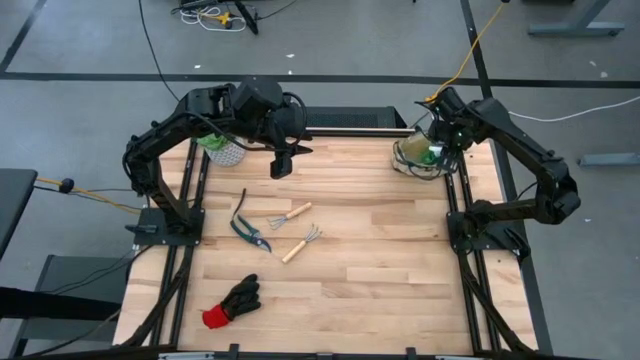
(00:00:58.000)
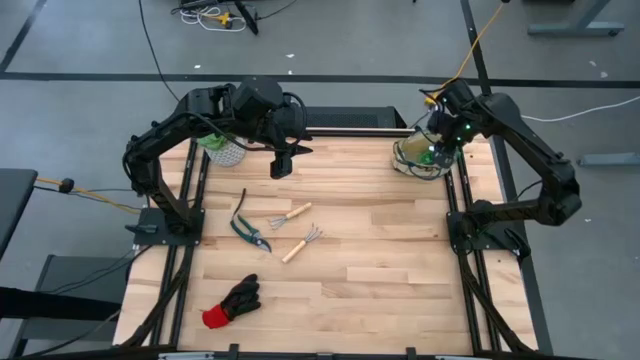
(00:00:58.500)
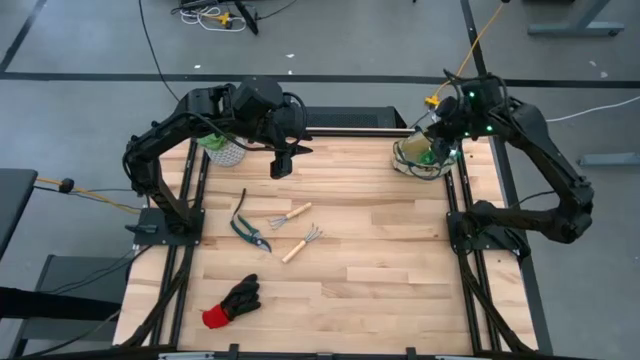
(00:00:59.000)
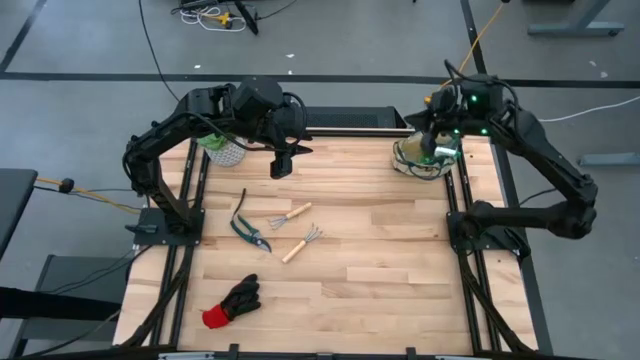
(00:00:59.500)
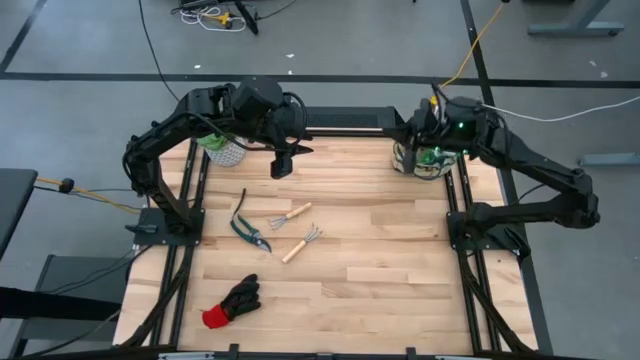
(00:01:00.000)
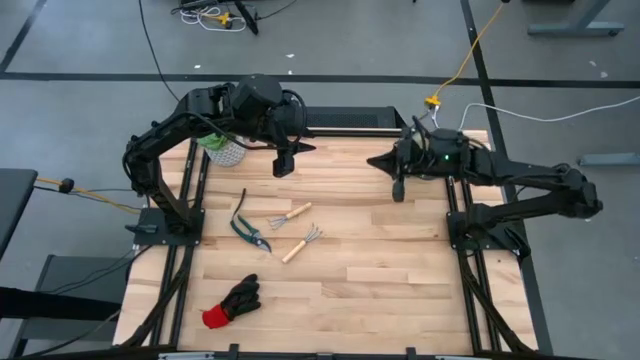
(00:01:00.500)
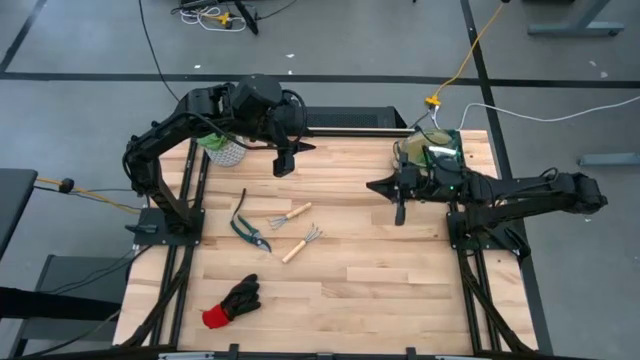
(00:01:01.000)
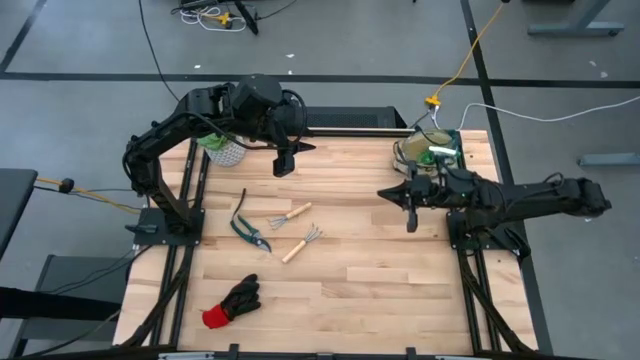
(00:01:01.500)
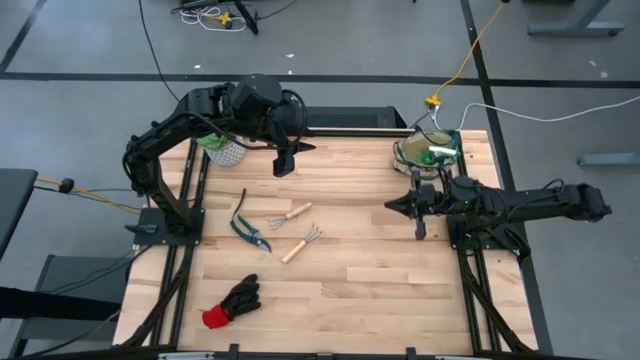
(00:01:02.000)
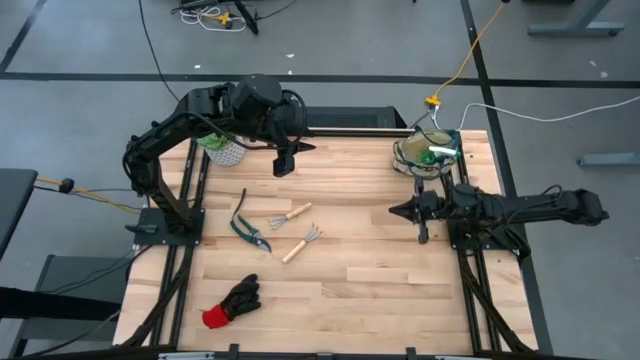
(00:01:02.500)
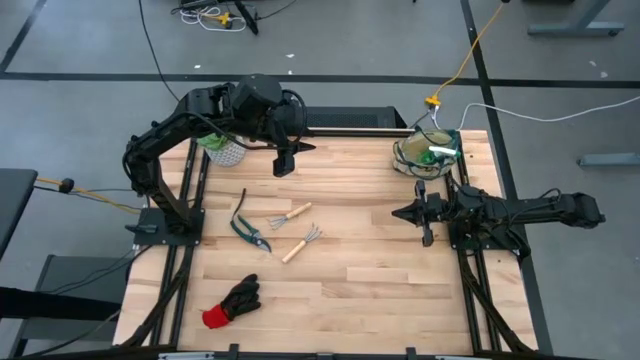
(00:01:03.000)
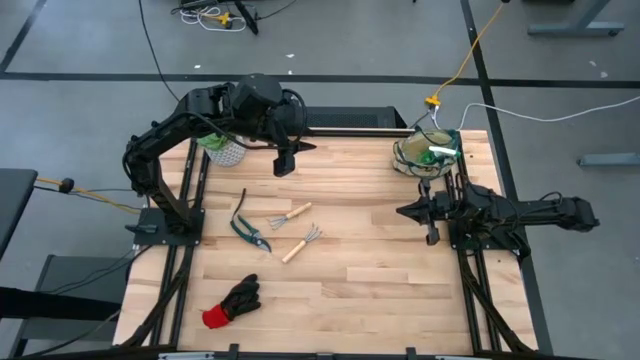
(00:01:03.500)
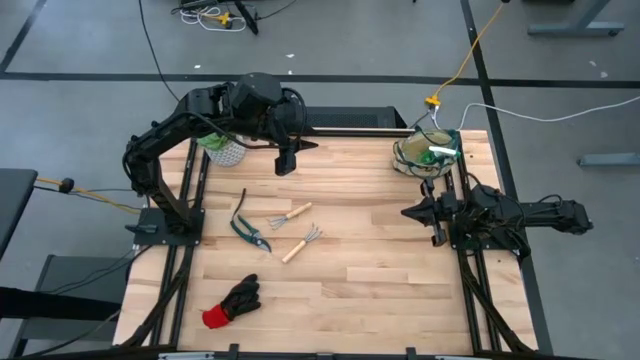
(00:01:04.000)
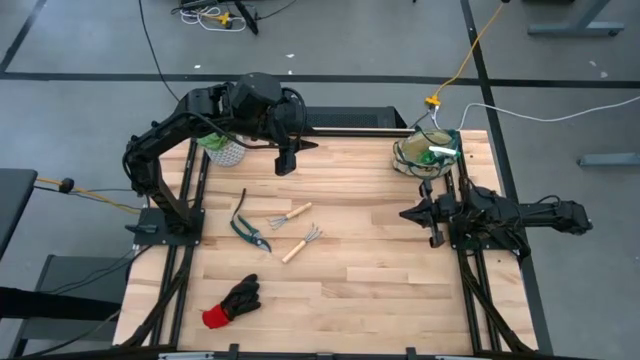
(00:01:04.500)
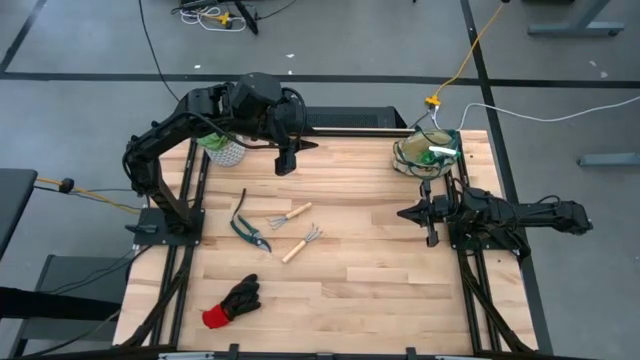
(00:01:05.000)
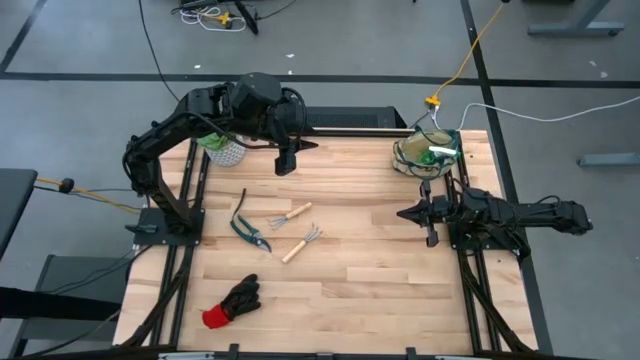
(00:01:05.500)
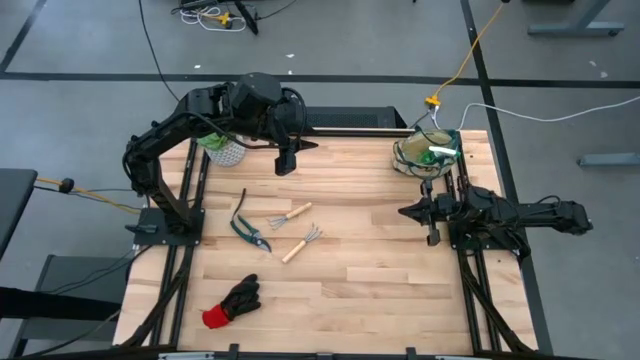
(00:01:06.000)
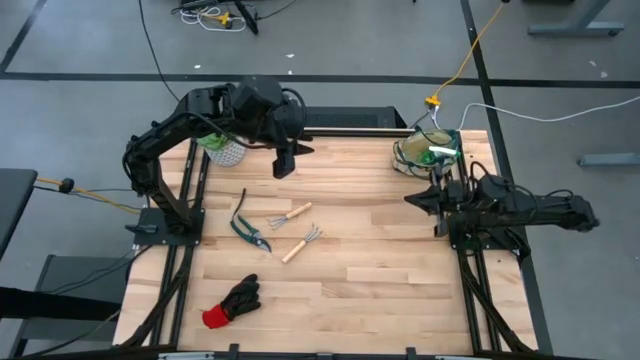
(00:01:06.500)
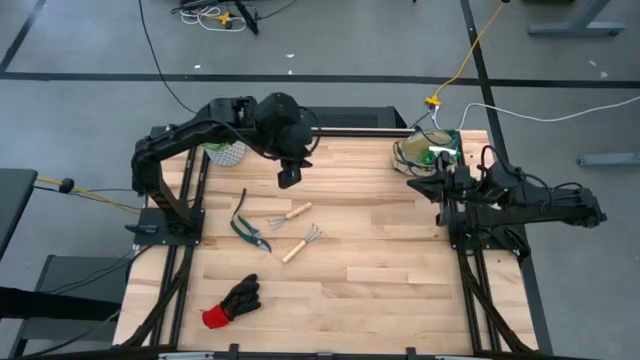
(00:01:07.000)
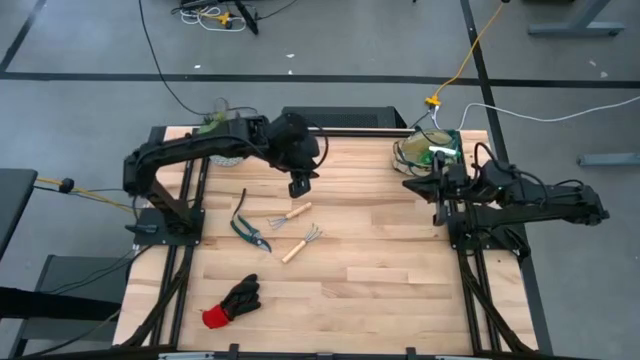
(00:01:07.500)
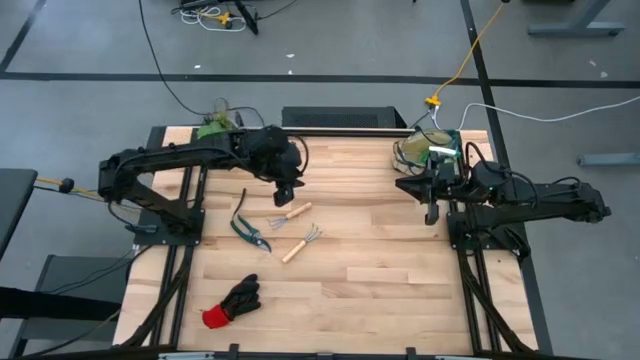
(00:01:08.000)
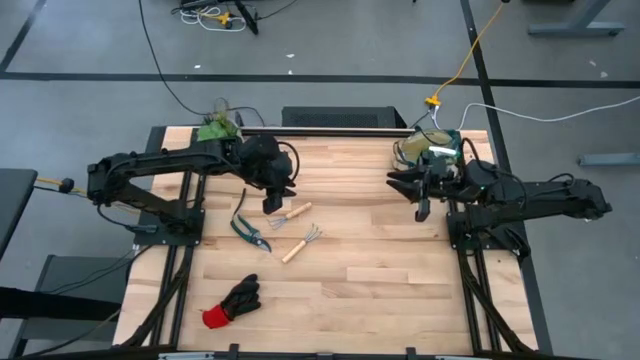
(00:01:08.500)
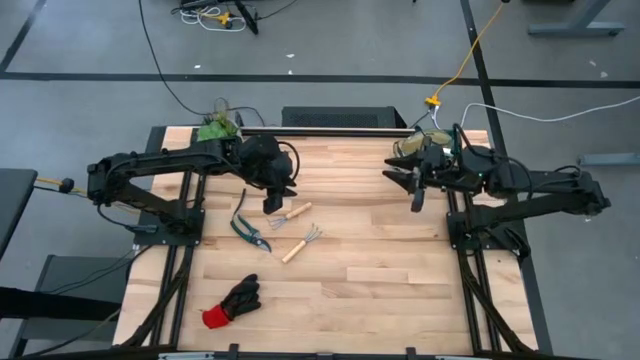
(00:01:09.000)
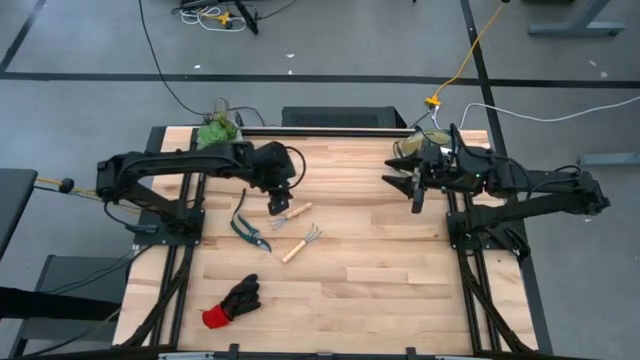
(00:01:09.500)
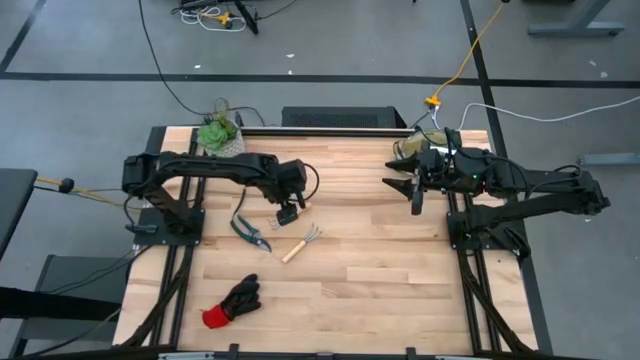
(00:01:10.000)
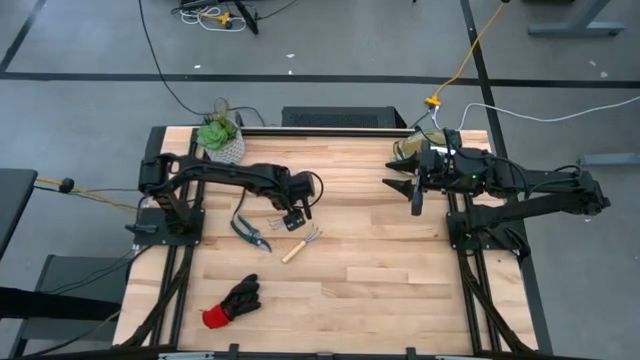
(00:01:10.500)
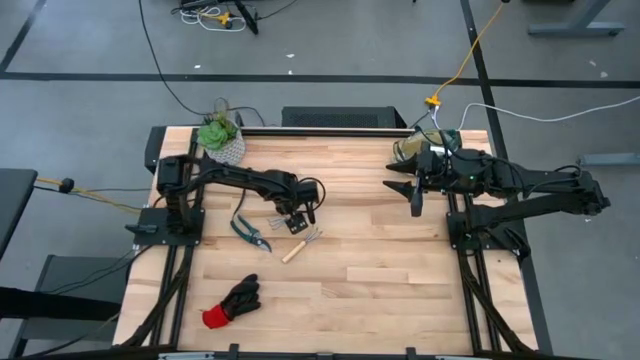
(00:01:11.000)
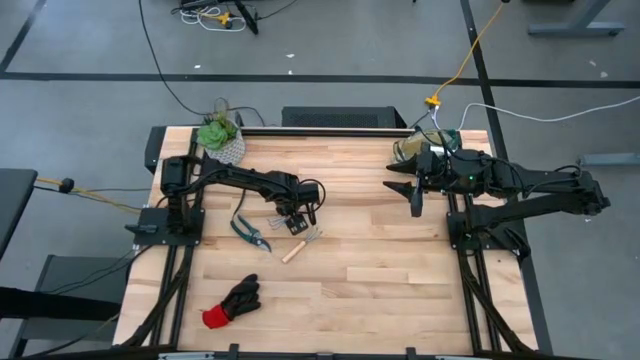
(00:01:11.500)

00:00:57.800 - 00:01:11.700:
Task: Pick & Place Garden tools in Gardening bag
Put the top brown hand rake into the brown gardening bag

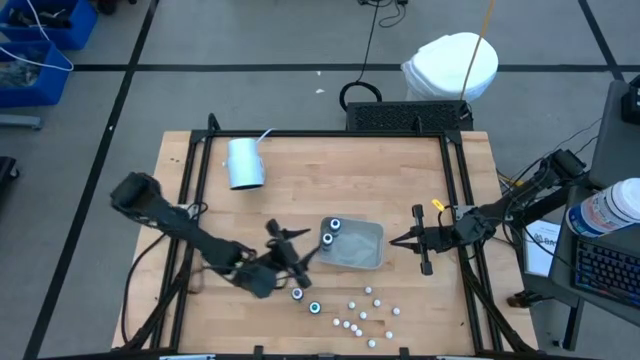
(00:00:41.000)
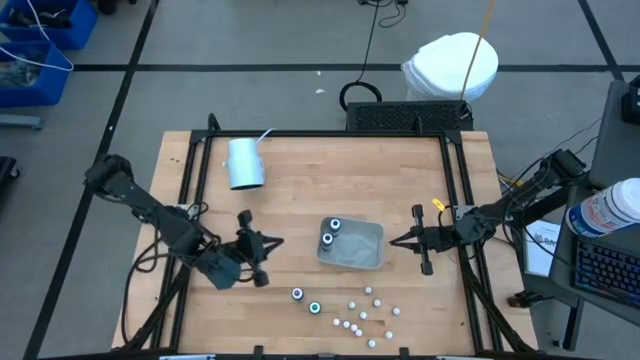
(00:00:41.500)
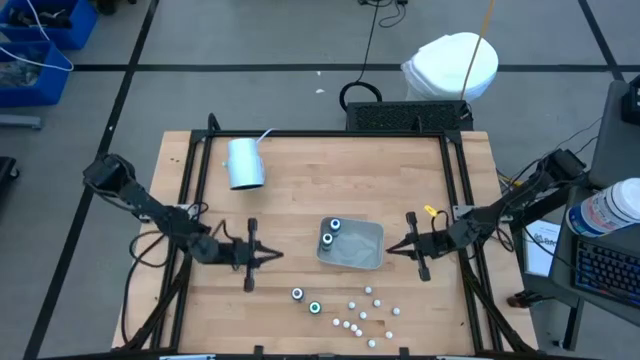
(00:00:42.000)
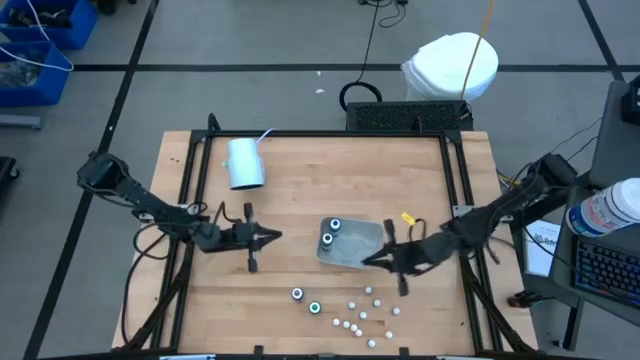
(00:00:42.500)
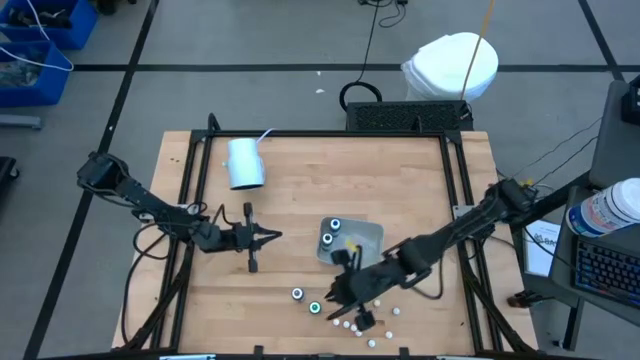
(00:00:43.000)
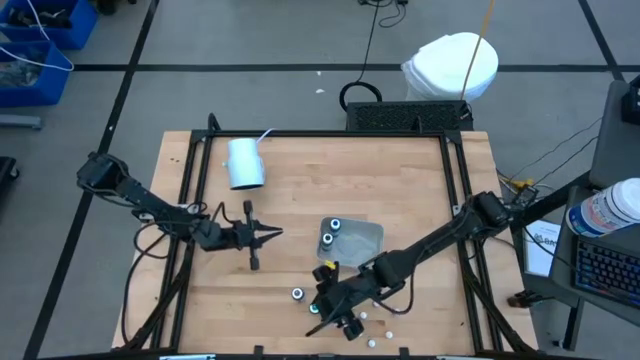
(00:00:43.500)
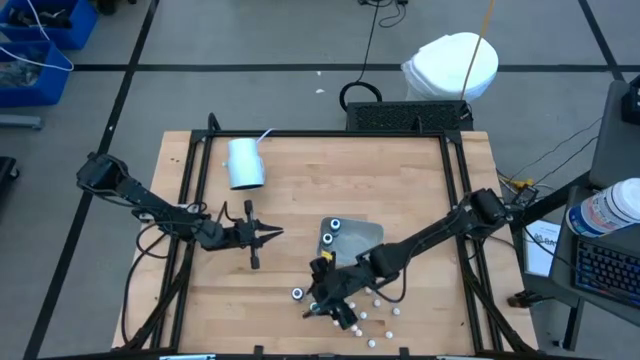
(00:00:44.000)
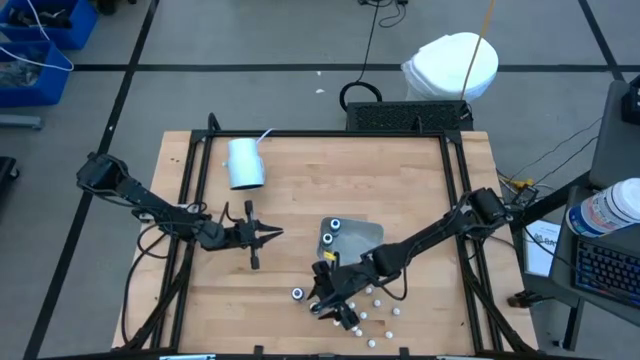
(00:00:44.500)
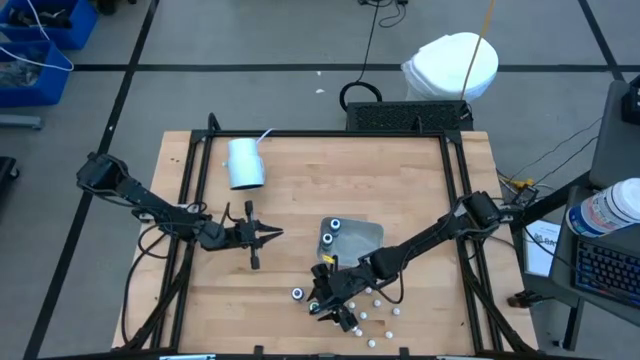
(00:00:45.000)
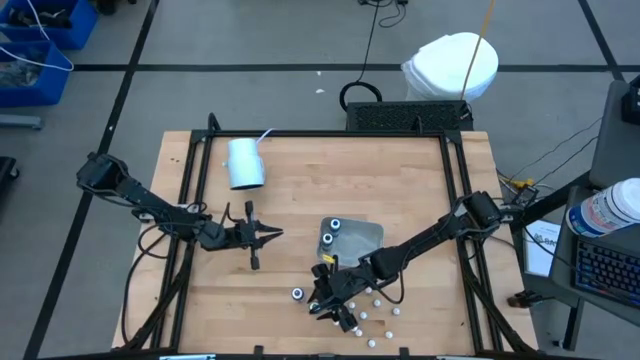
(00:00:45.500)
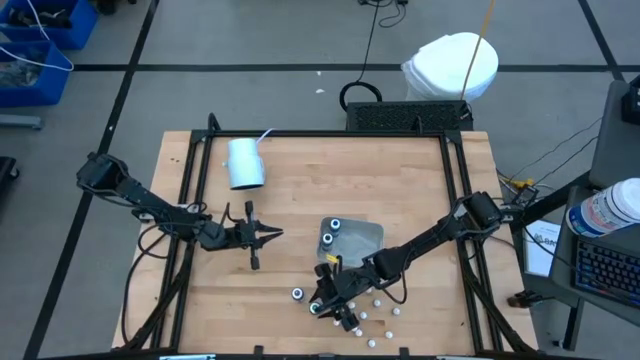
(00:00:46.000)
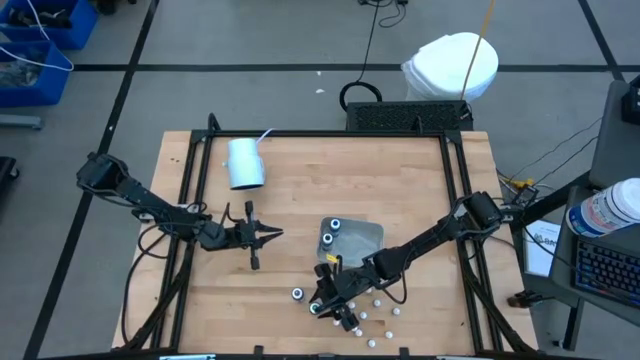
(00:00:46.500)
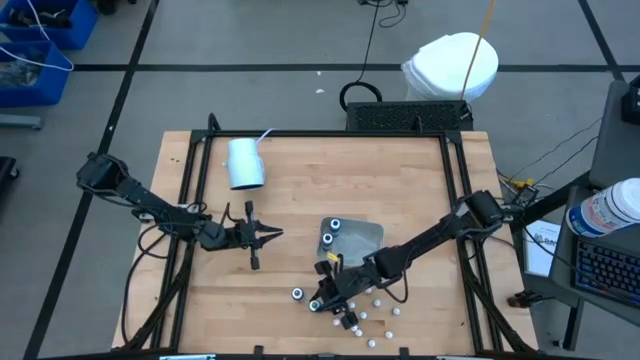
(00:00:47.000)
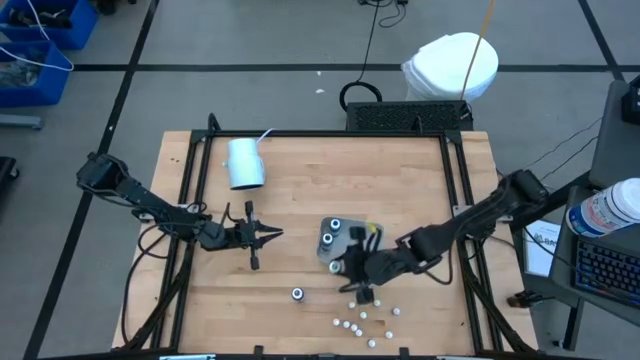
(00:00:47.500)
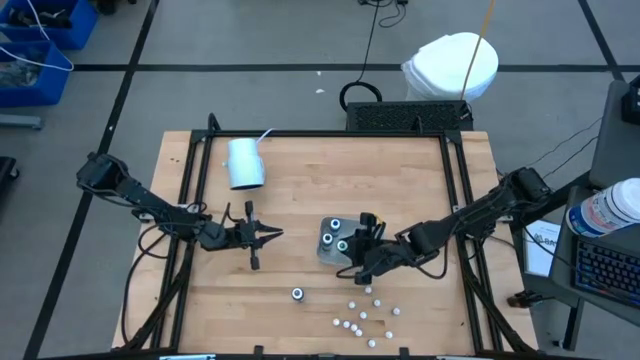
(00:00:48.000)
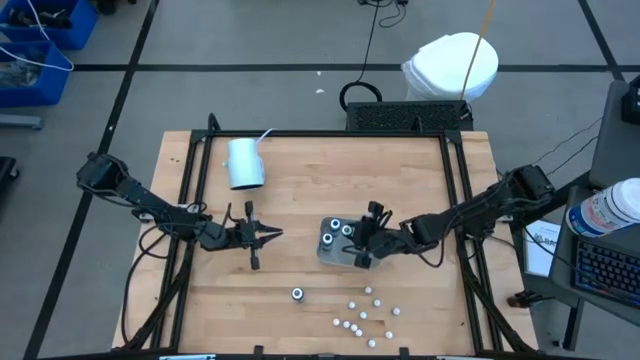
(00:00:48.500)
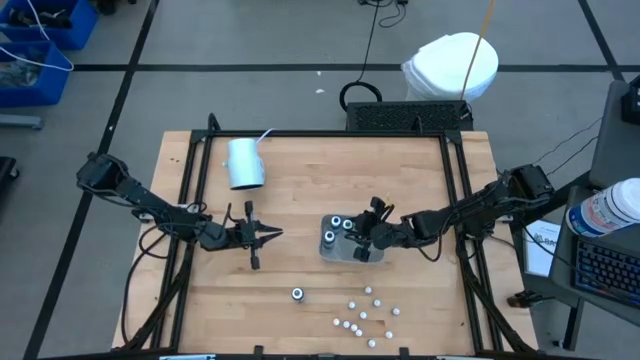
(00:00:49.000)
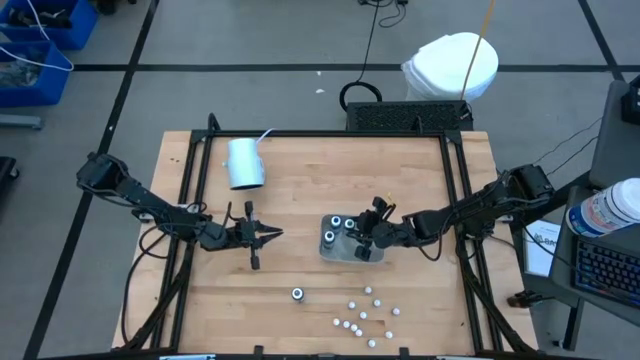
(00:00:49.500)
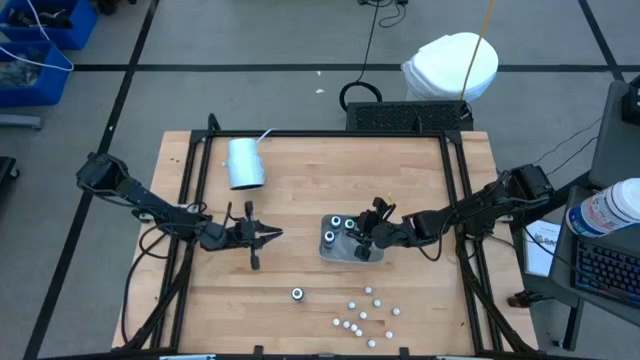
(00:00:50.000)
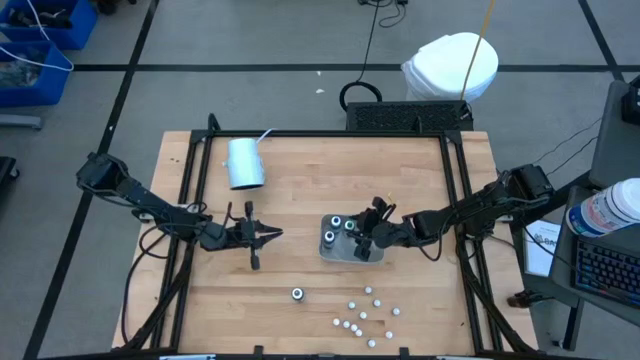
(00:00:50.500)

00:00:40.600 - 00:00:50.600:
Task: Pick & Place food coloring
Put the large green food coloring bottle into the gray bin
